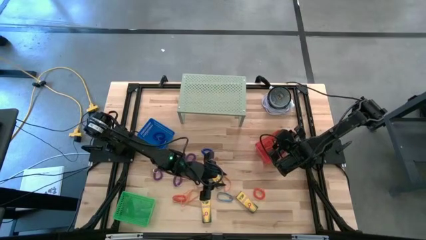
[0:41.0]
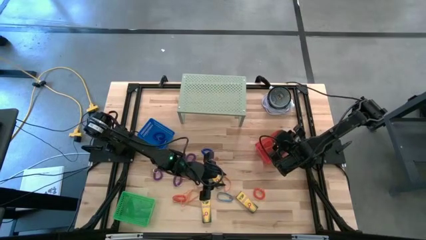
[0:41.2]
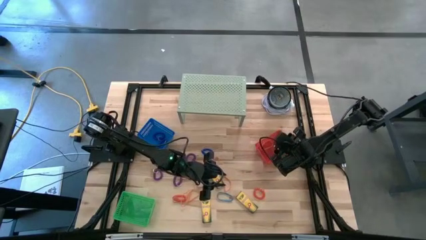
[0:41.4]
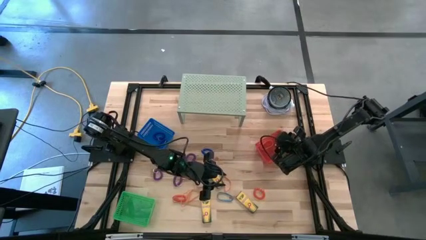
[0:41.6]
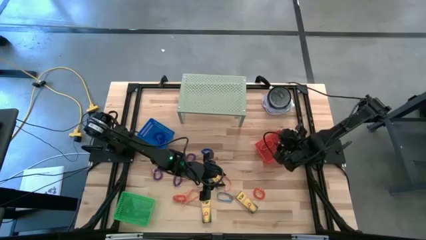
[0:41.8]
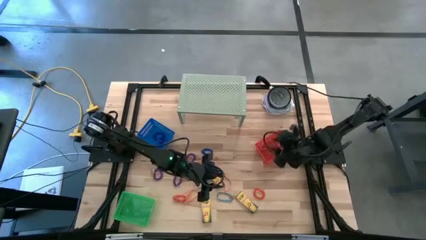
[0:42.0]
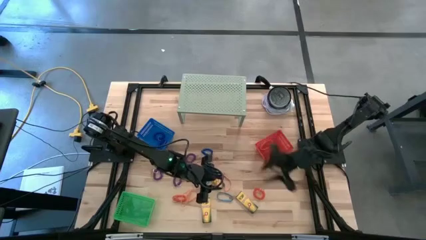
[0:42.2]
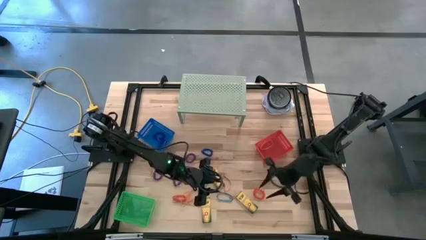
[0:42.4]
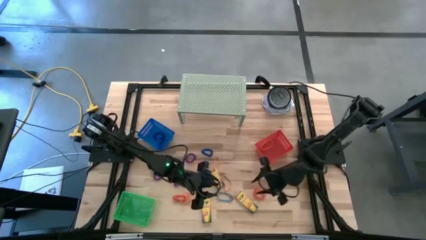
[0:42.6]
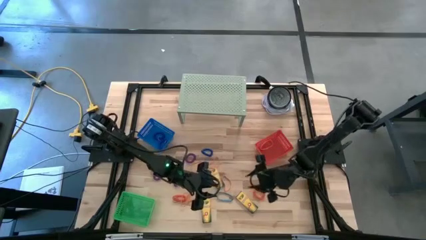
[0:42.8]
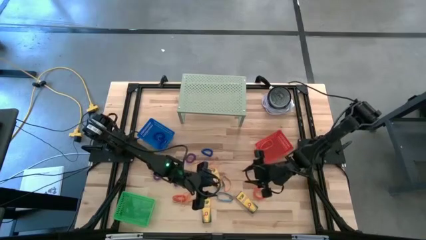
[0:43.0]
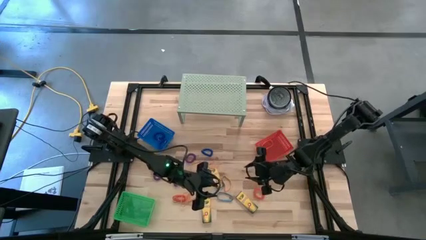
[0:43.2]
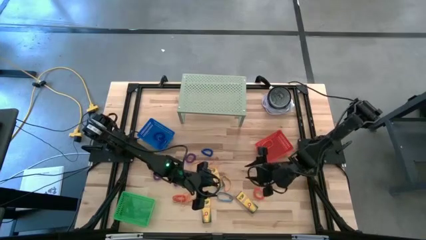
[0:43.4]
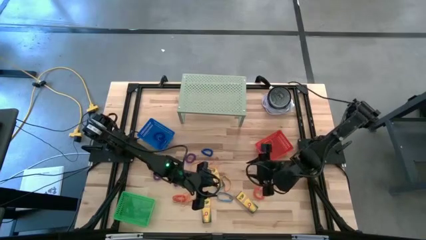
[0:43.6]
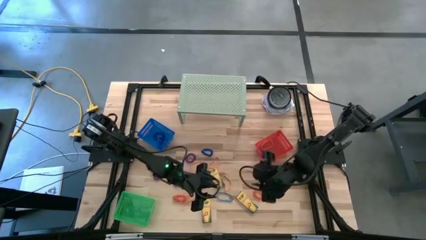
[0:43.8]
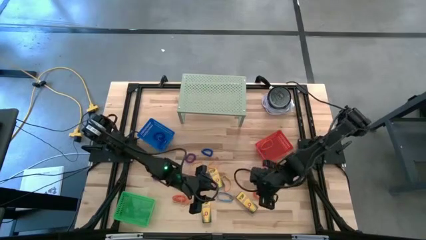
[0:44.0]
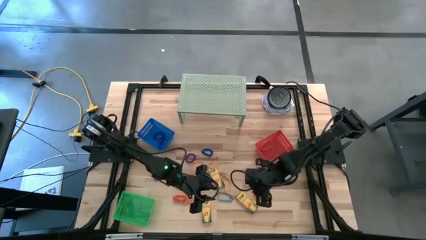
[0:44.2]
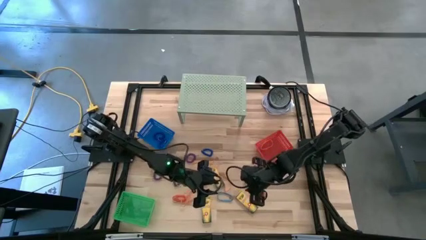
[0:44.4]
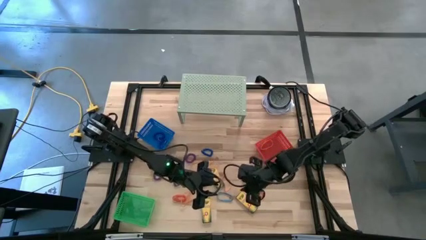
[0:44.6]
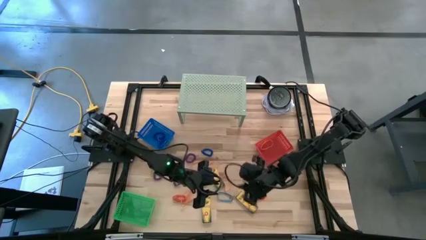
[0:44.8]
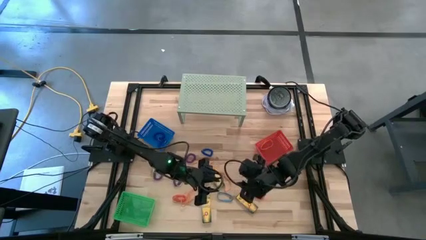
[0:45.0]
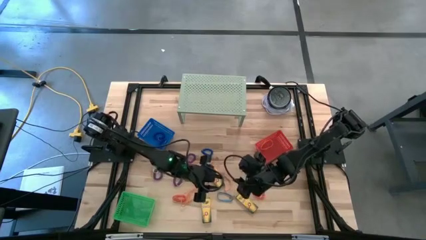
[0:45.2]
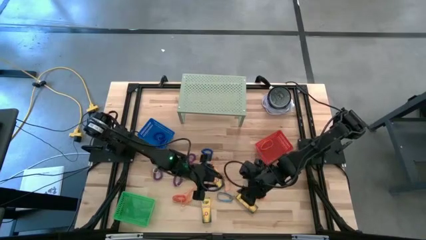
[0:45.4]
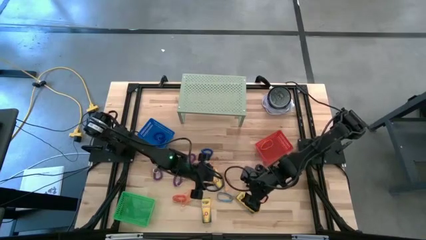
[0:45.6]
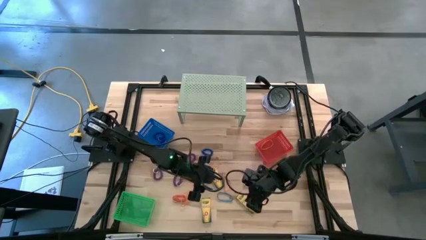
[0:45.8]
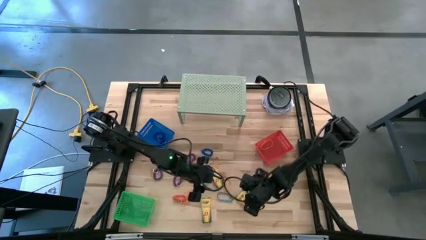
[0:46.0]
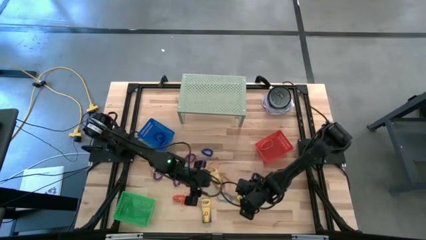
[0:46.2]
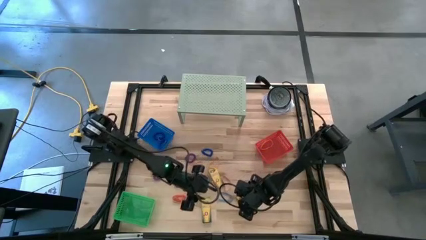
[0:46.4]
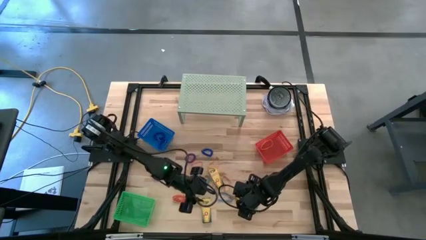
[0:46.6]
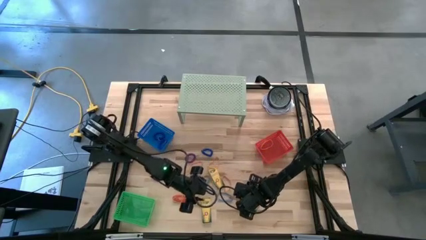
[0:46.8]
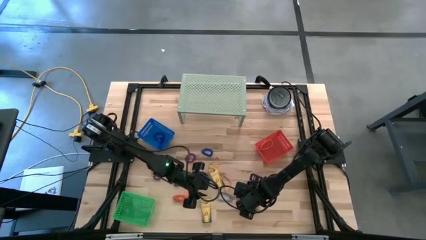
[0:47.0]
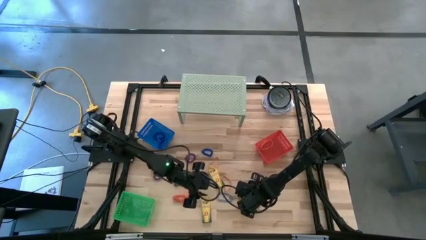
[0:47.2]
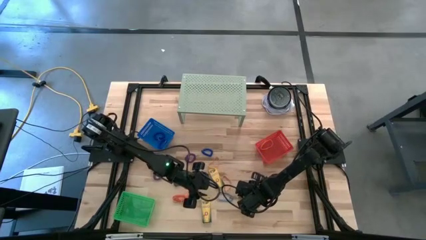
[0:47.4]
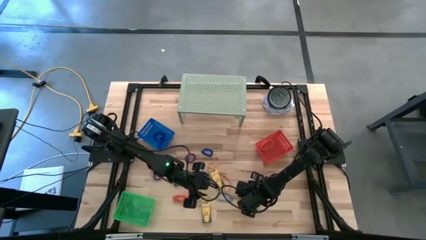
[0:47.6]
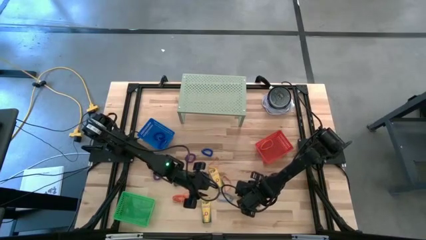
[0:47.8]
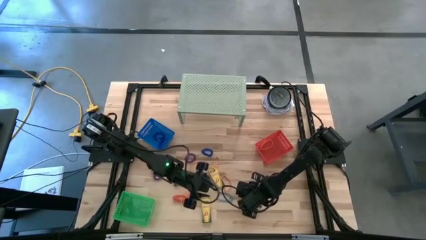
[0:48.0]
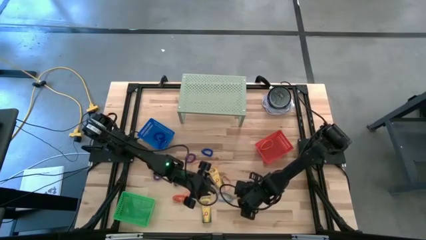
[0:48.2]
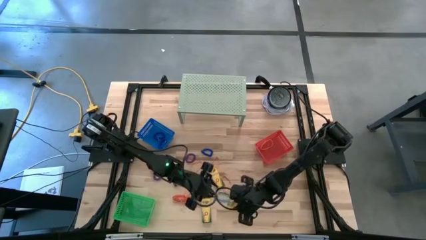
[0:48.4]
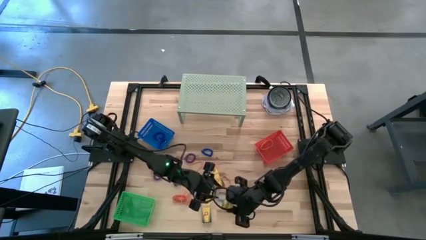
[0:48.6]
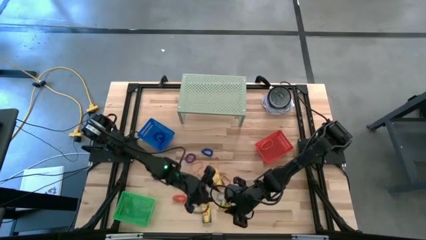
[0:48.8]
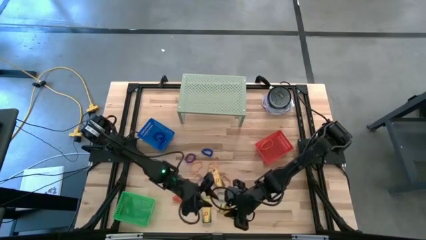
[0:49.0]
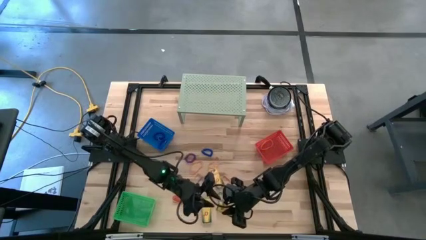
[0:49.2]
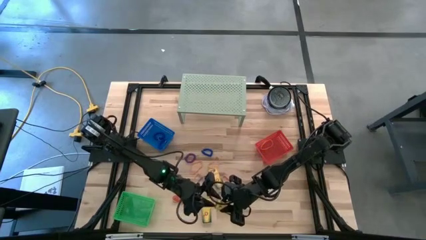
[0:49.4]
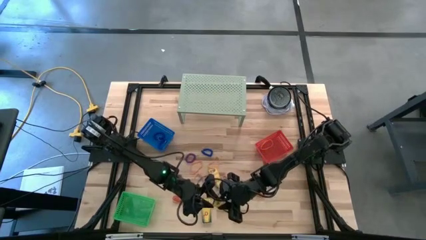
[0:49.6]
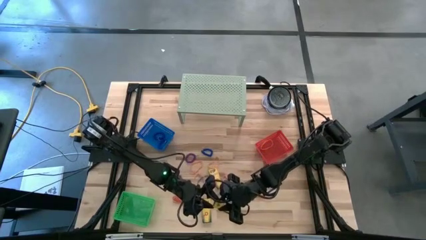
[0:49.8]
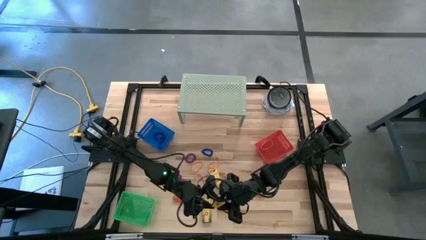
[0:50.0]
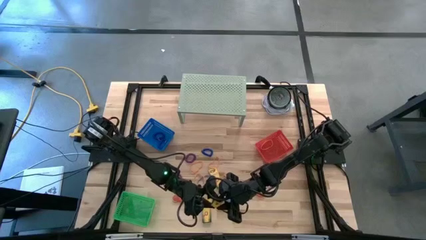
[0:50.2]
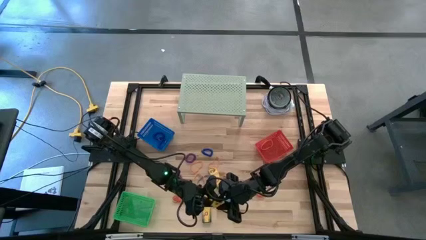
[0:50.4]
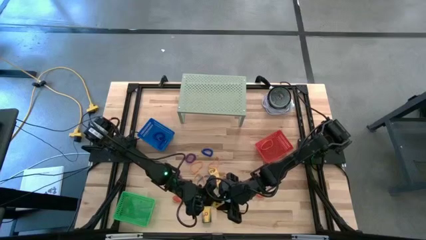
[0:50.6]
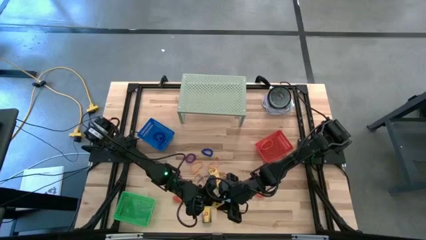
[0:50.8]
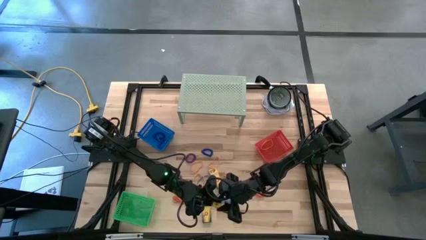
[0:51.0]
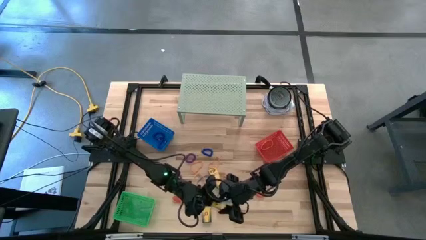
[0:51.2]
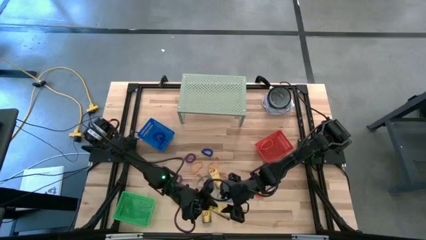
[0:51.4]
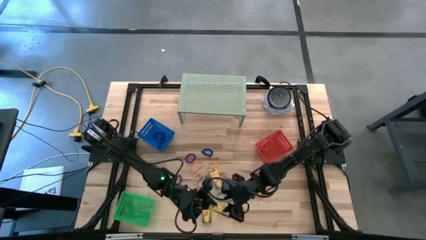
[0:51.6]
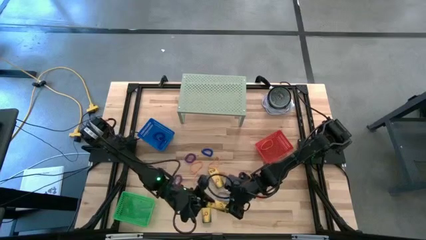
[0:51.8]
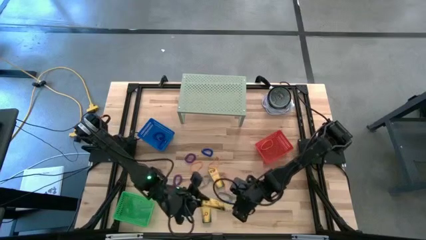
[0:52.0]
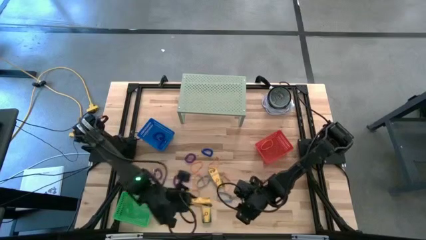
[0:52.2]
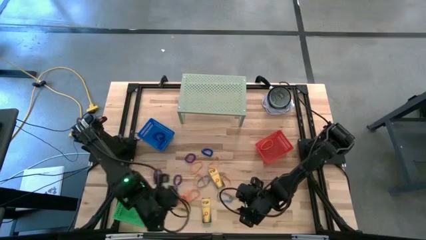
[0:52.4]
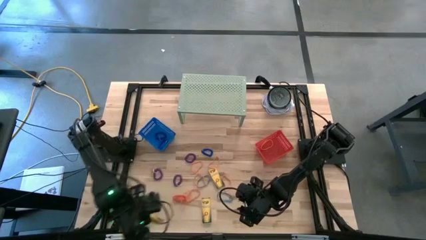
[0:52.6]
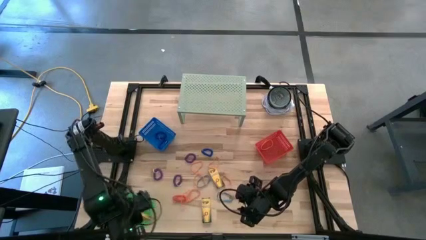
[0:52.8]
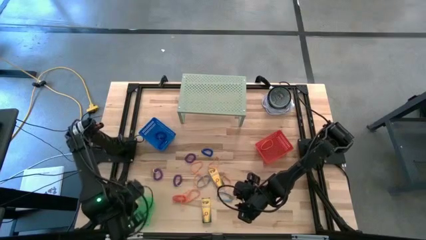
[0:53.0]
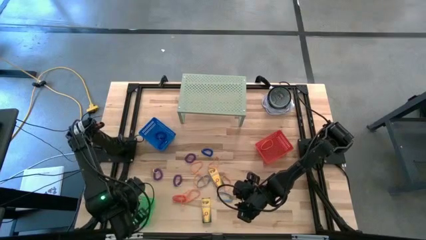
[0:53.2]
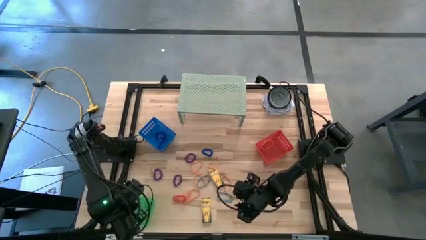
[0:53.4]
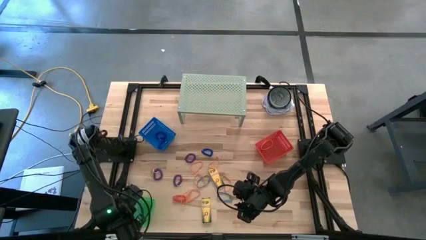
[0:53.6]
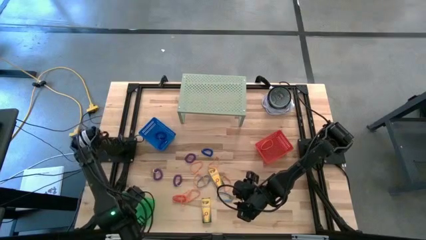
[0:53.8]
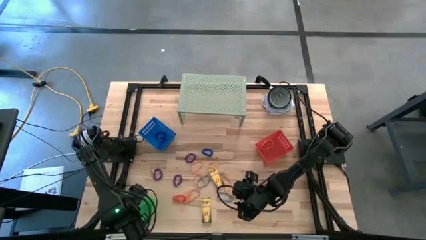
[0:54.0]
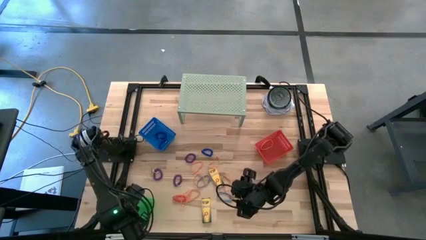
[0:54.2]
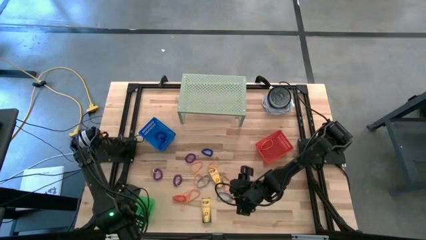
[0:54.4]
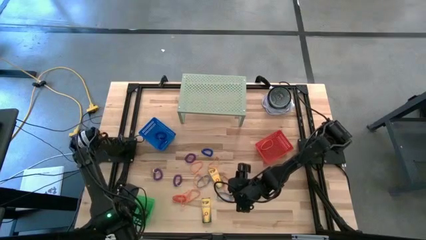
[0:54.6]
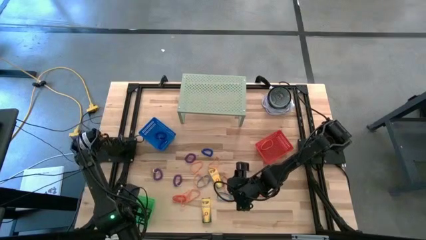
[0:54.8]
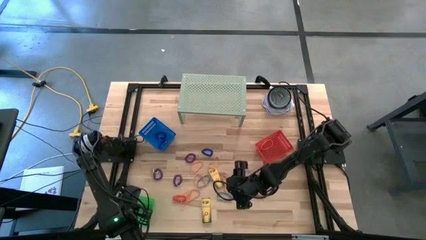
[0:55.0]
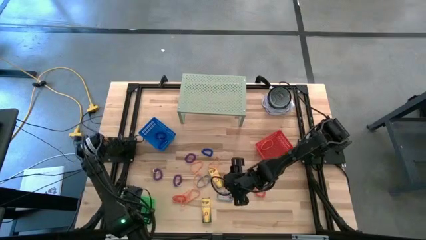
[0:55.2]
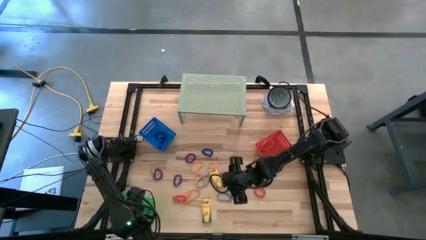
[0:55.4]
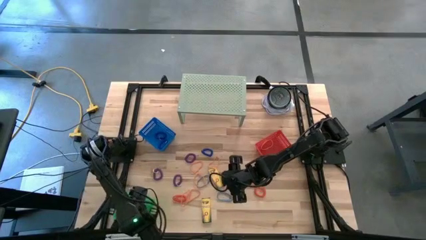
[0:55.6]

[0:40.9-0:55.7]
Task: Pick & Place Office Desk Supplies
Put the crayon box into the green bin

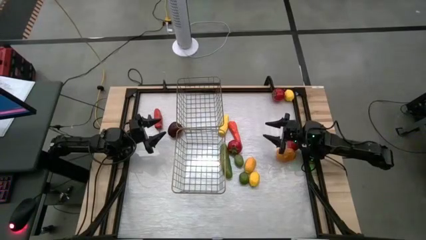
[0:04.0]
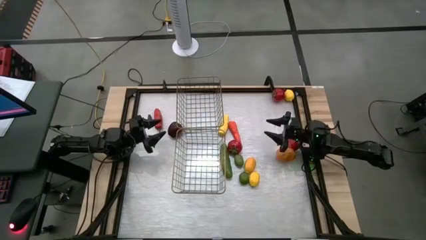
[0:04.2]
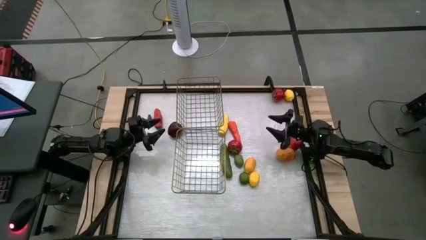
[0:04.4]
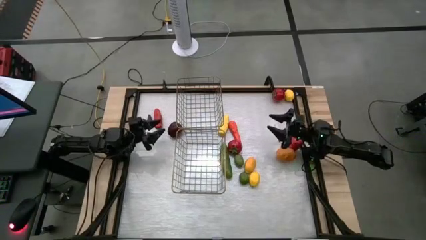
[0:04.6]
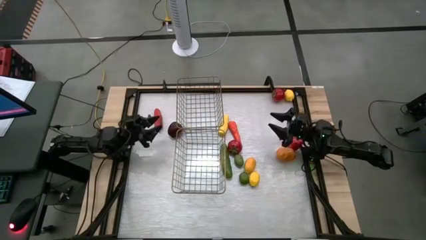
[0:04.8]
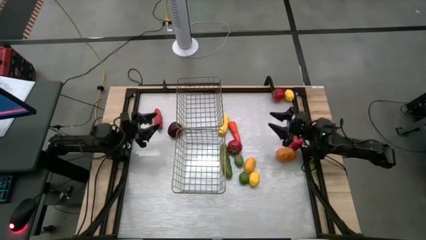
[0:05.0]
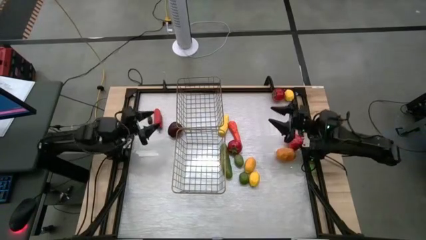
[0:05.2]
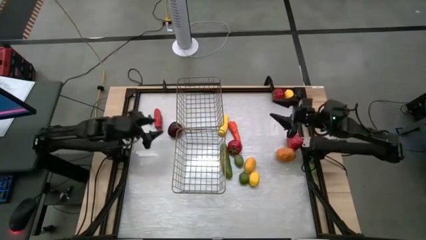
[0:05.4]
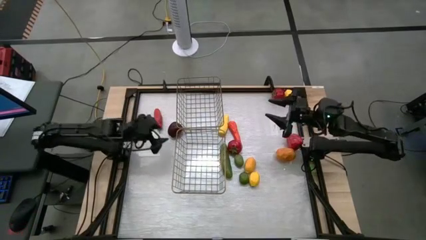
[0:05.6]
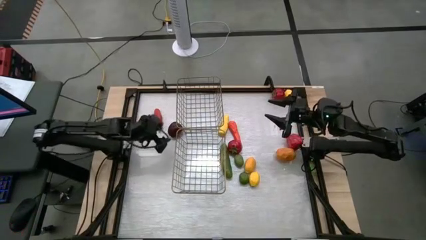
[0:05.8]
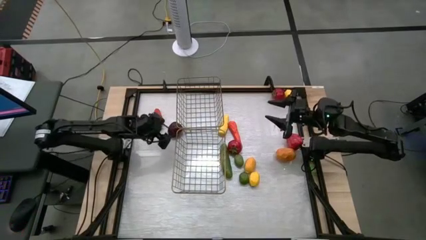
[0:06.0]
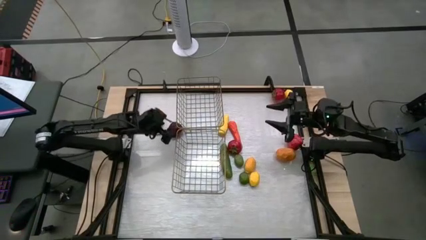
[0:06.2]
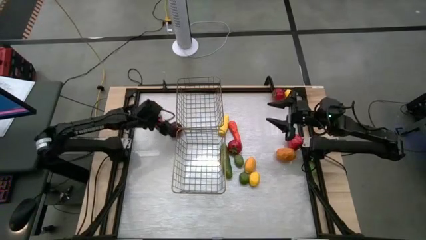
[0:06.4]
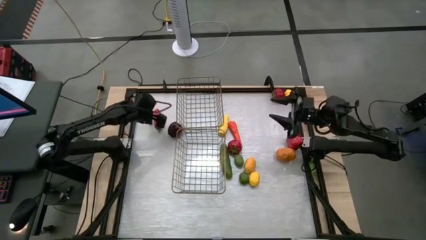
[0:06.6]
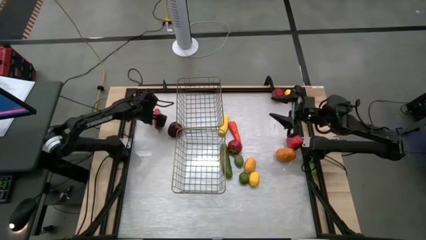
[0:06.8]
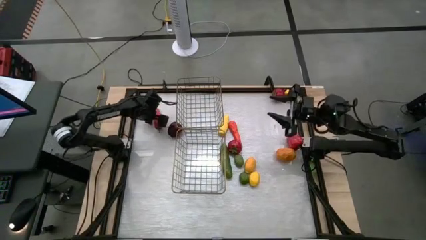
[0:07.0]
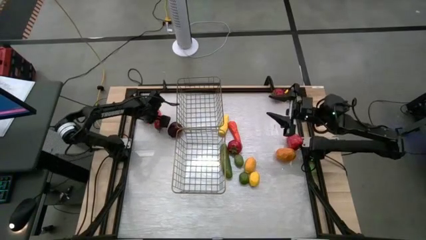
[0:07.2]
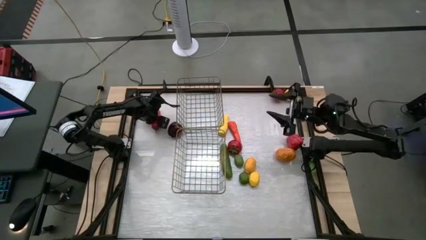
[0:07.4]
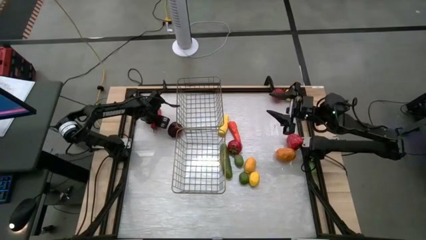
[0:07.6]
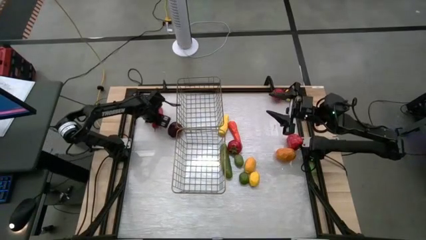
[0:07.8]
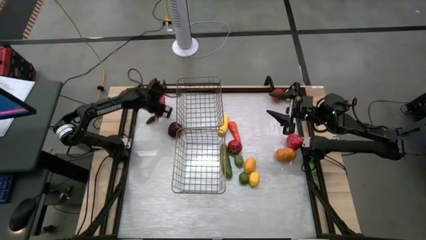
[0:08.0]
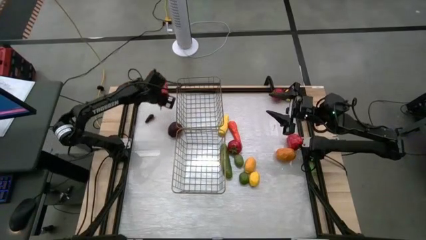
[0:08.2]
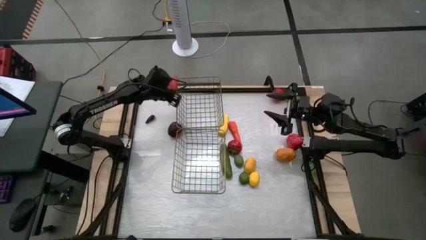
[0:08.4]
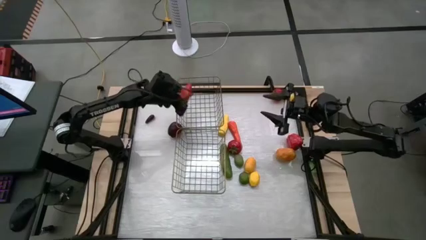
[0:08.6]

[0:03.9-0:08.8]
Task: Sort produce into baskets
Put the red pepper into the top basket
